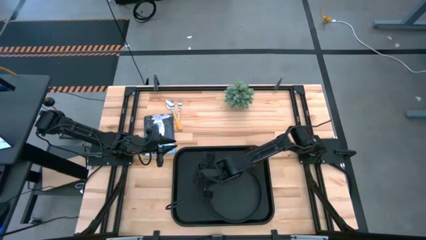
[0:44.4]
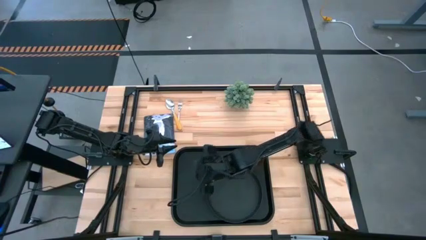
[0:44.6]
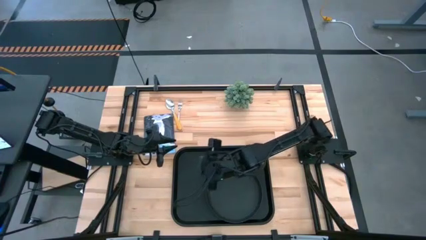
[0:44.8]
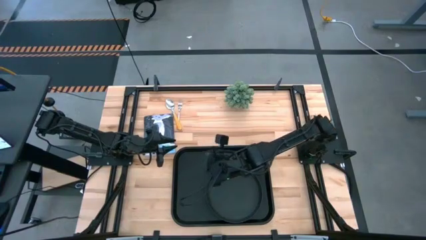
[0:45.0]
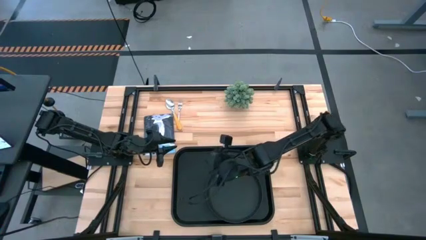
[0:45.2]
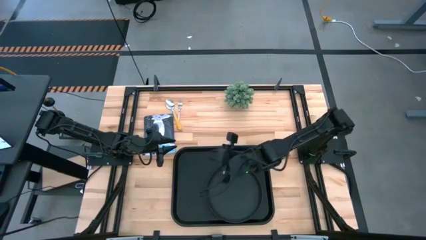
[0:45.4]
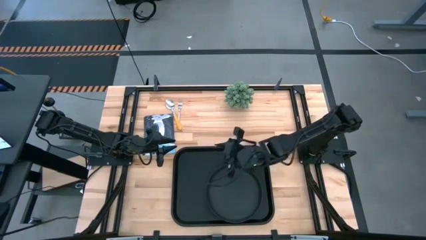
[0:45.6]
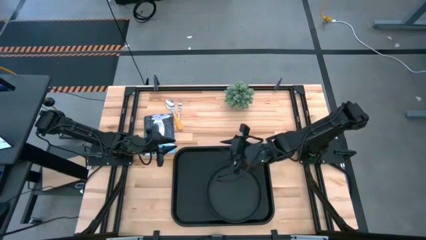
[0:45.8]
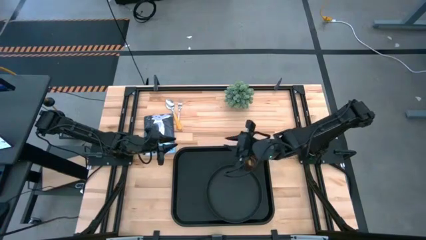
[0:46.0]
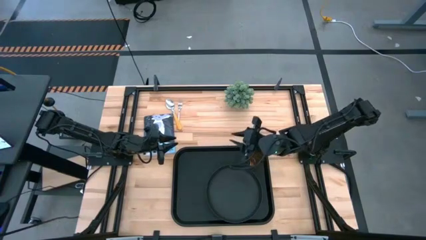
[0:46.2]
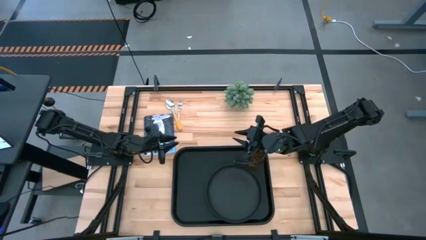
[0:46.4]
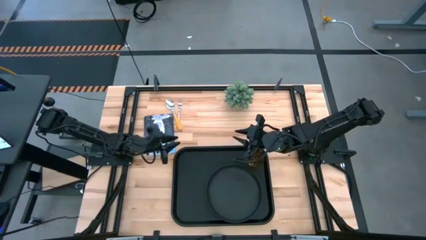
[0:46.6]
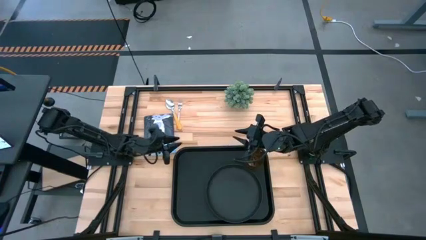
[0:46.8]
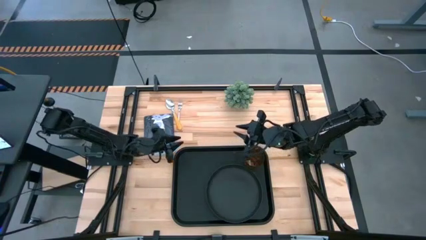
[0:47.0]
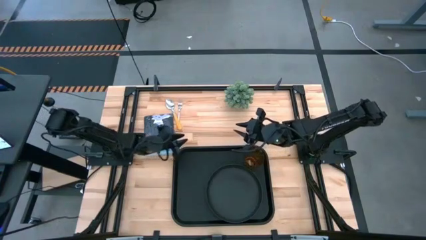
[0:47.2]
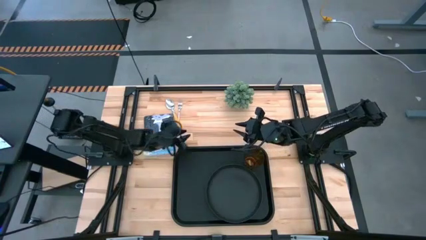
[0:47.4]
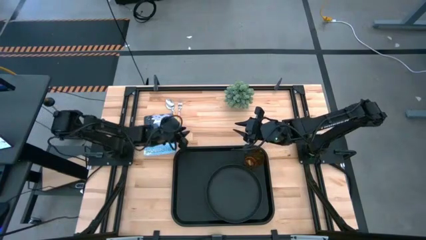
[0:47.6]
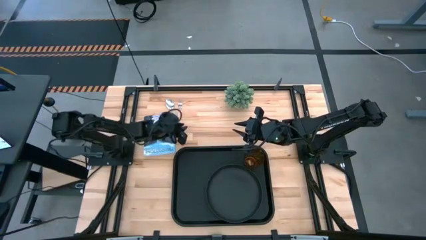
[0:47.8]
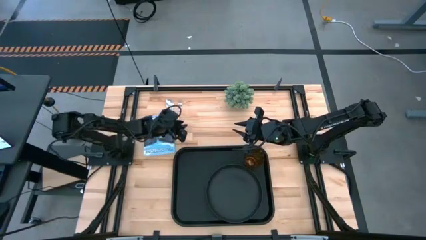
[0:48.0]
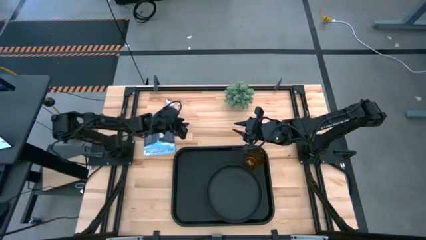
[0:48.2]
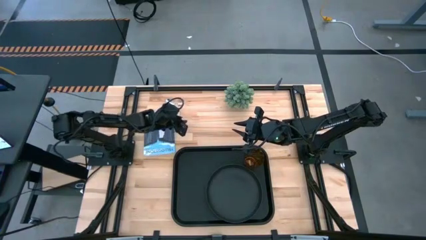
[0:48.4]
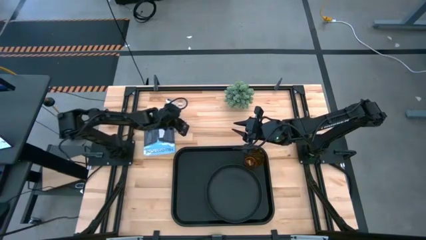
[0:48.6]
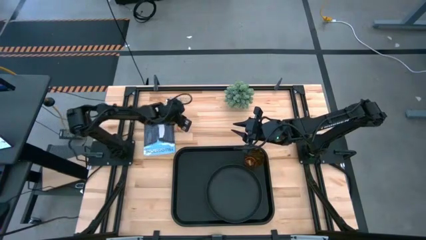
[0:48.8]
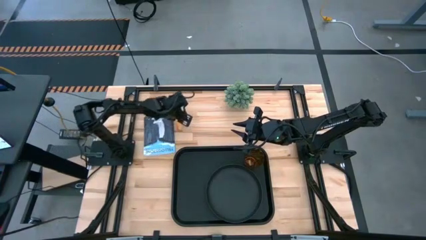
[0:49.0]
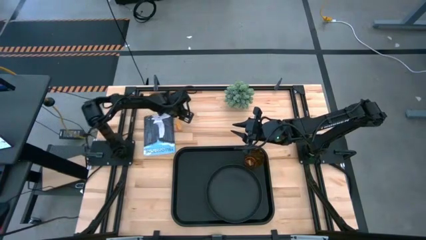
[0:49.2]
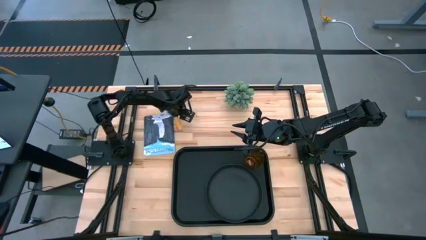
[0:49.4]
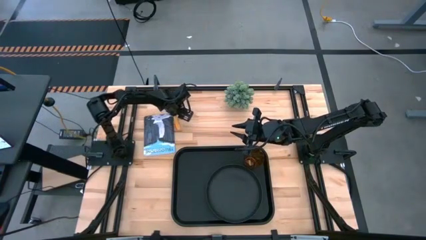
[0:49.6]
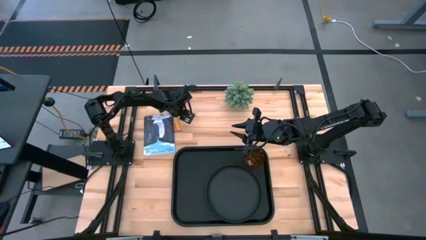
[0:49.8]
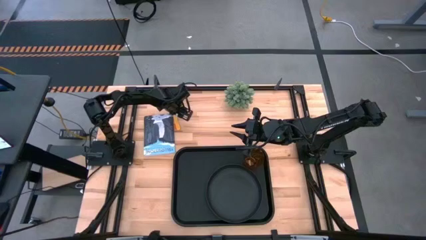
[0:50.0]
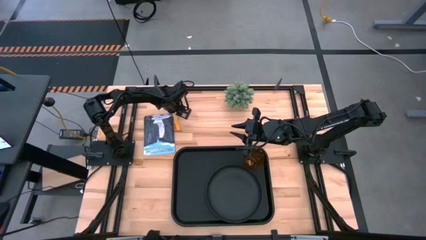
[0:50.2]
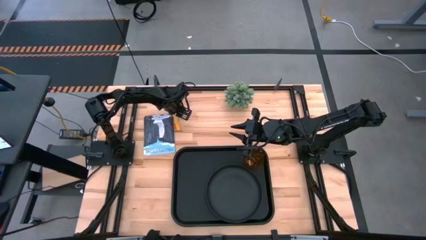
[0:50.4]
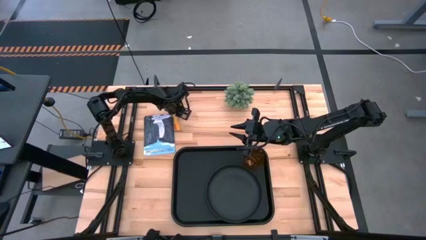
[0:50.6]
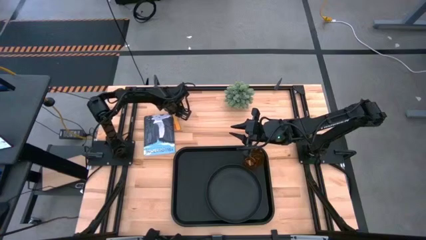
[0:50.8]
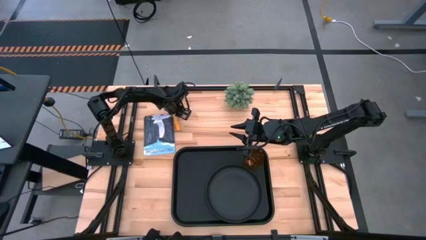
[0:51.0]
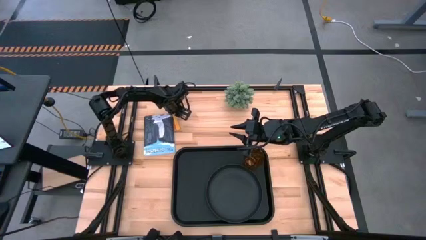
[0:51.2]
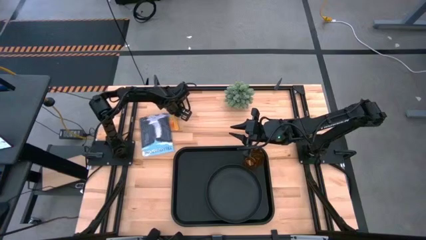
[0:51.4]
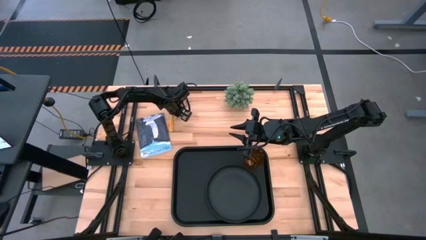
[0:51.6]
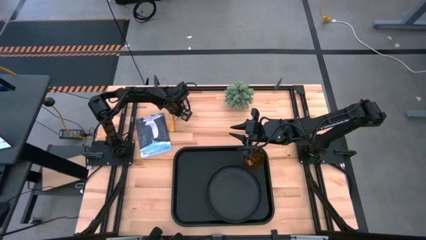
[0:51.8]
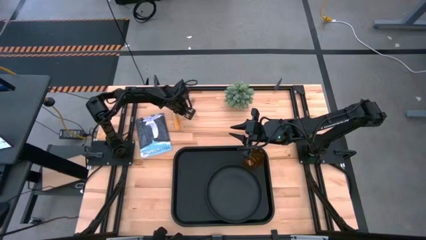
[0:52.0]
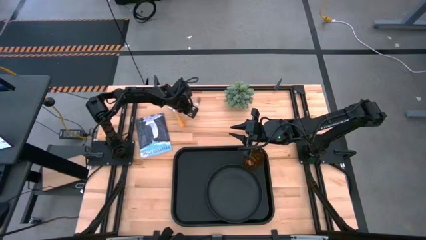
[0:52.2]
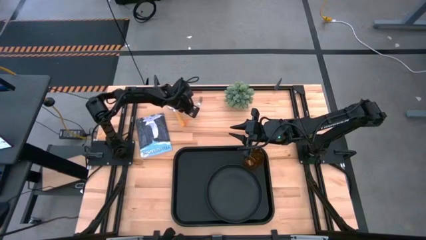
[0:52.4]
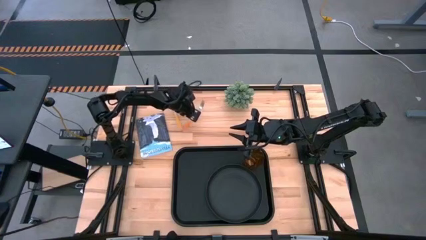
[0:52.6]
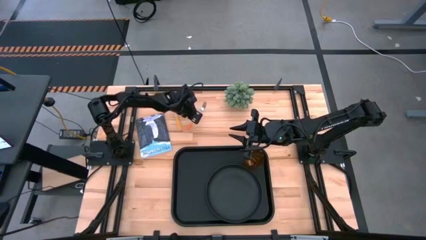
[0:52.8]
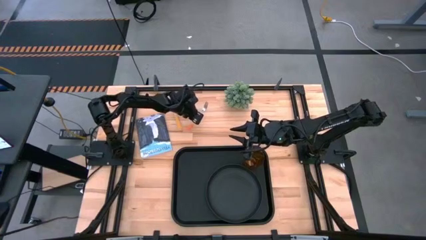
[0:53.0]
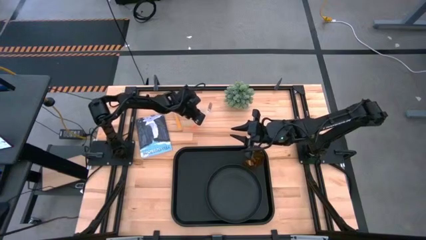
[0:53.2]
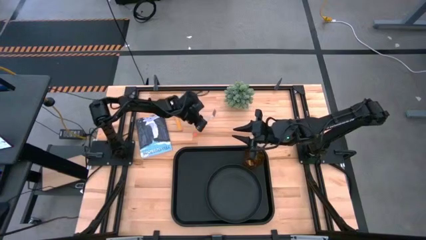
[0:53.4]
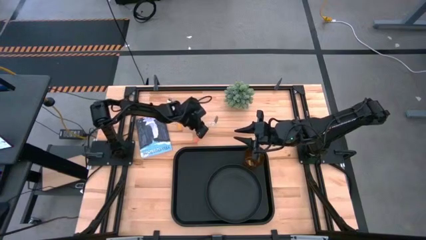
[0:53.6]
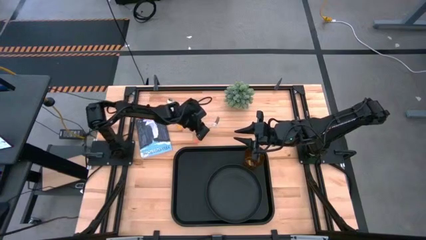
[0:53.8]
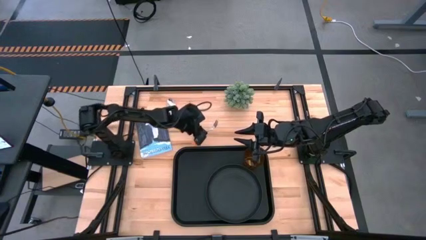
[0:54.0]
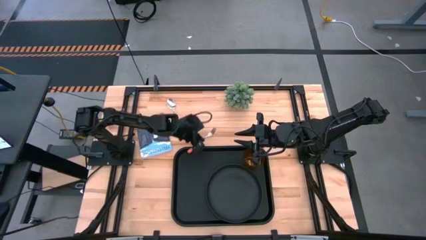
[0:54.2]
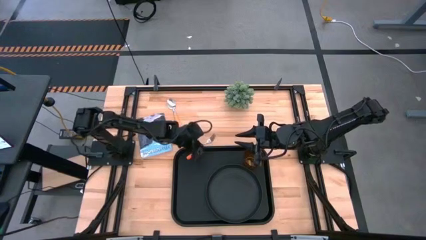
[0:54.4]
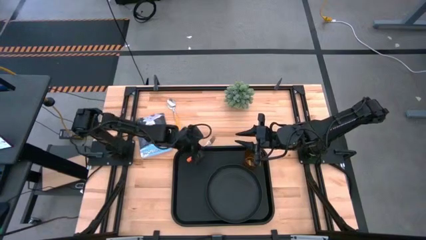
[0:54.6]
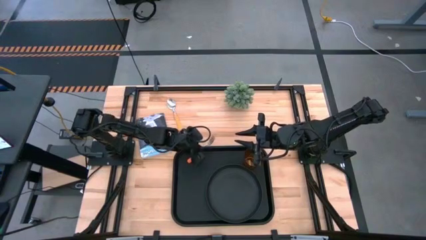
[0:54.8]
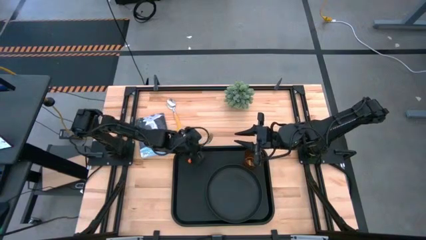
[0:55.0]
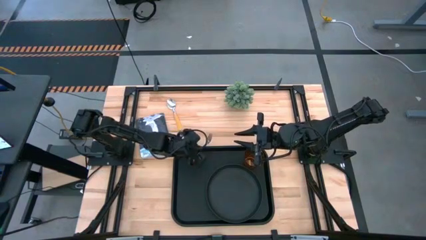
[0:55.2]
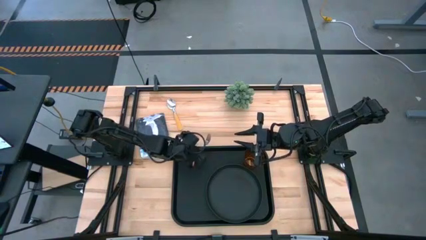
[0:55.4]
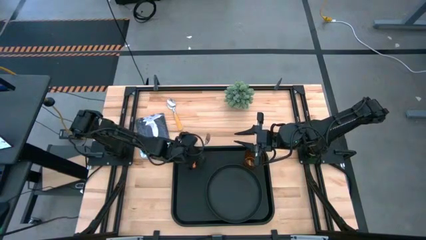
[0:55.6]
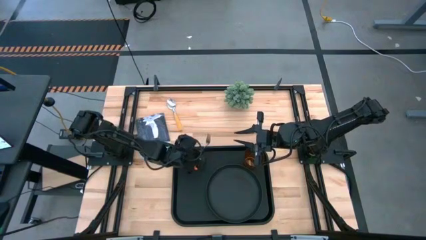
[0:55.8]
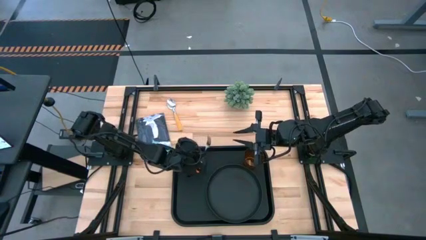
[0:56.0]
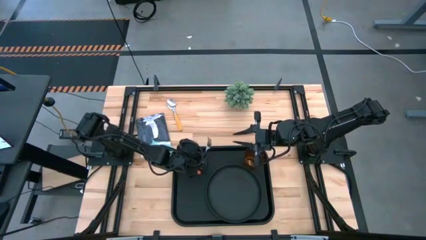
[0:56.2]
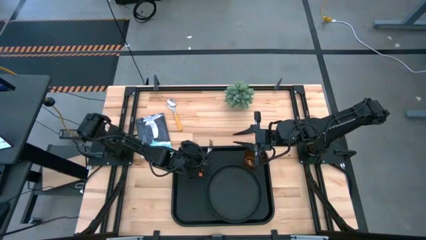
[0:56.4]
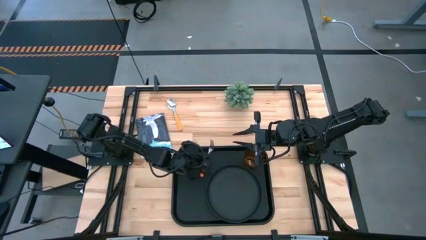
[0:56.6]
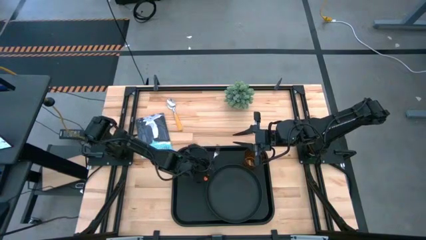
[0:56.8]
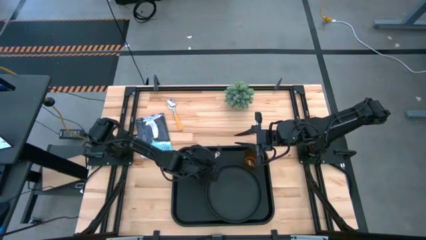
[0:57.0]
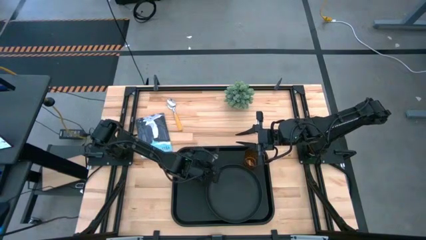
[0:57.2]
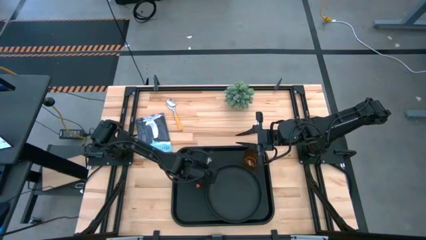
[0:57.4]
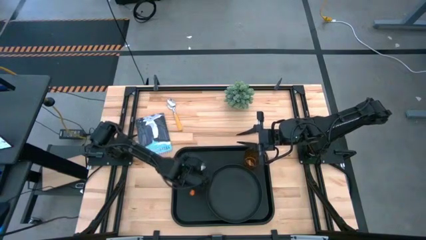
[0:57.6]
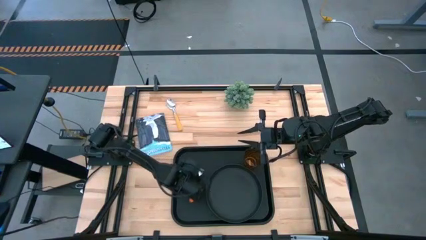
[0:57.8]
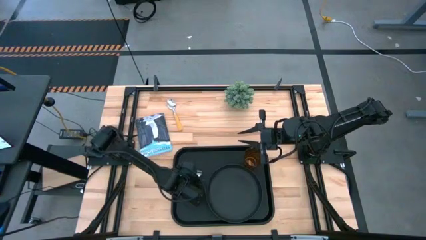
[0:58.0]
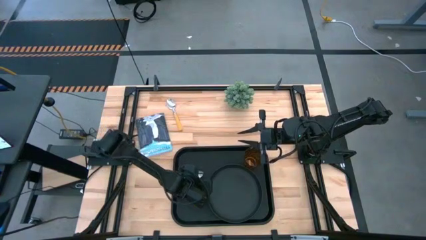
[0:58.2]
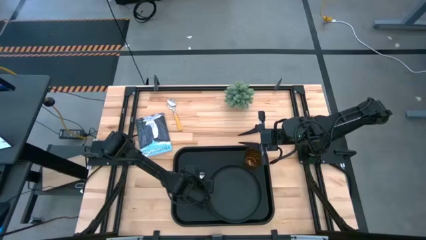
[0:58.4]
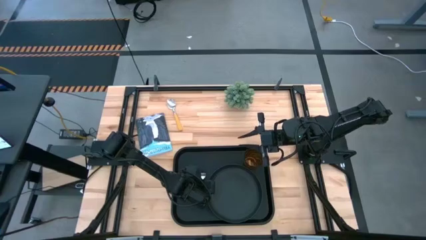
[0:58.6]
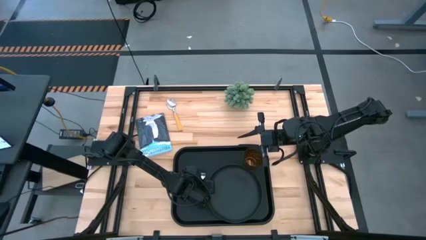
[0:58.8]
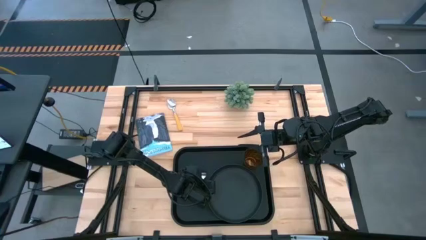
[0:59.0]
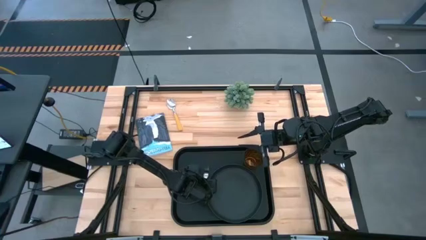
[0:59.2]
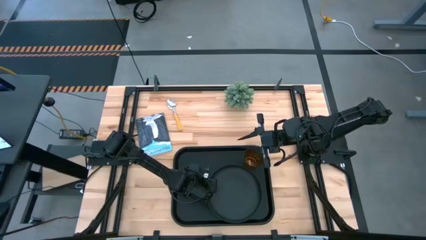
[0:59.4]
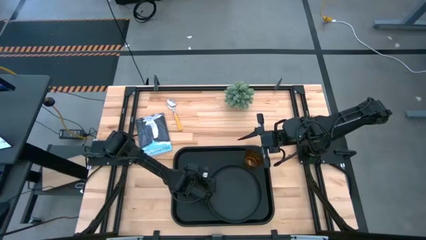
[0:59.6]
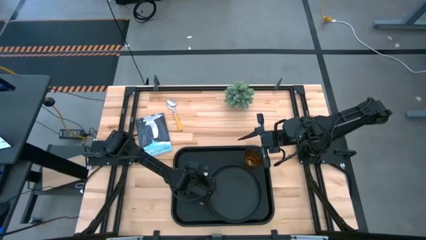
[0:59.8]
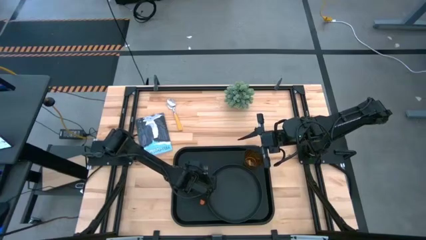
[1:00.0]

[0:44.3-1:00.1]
Task: Pick and place plate/cup/fork/spoon on tray
Put the orange fork on the black tray to the left of the black plate
